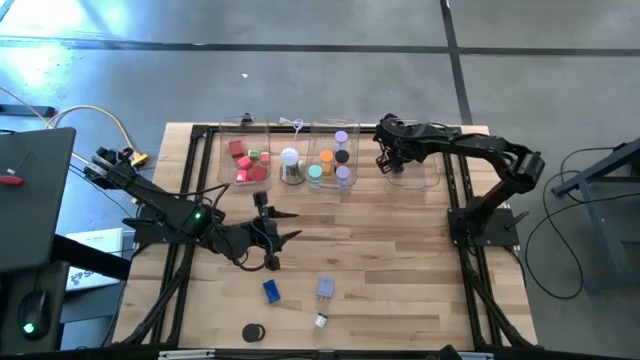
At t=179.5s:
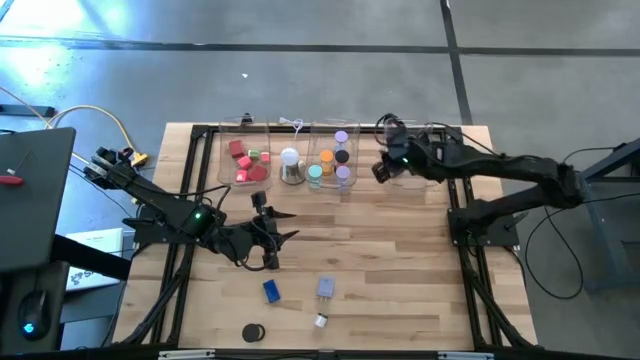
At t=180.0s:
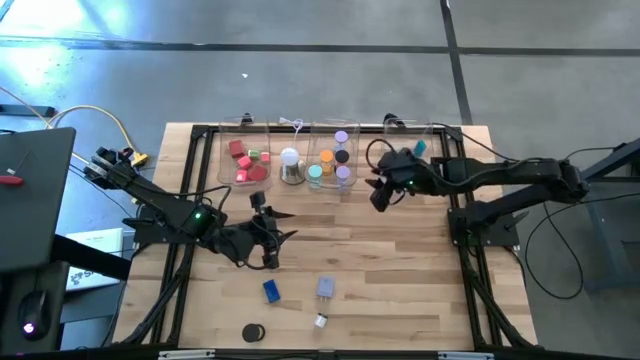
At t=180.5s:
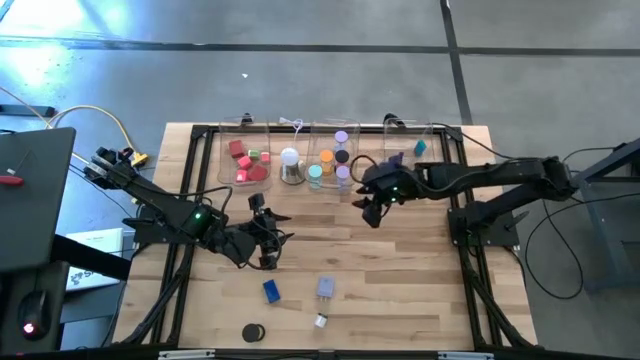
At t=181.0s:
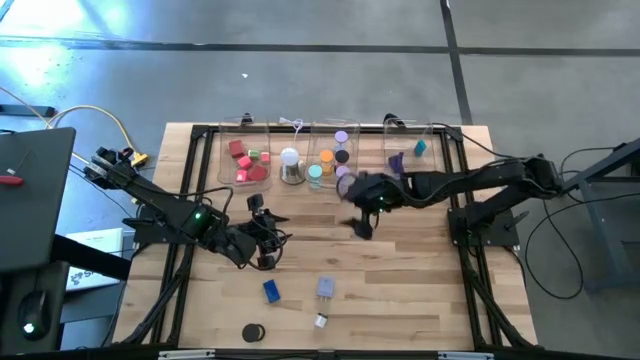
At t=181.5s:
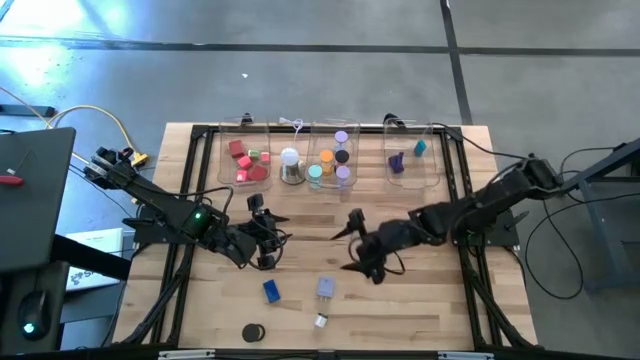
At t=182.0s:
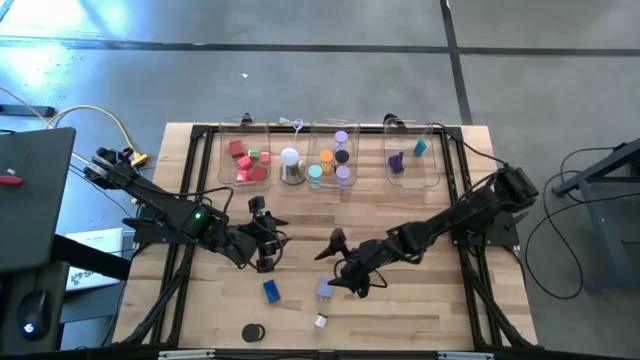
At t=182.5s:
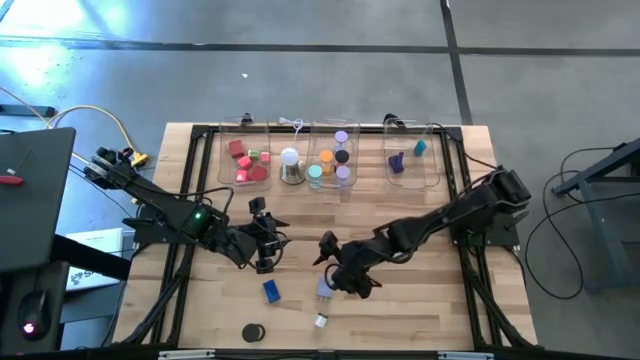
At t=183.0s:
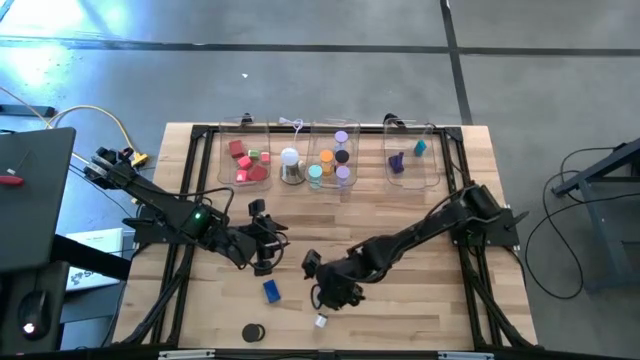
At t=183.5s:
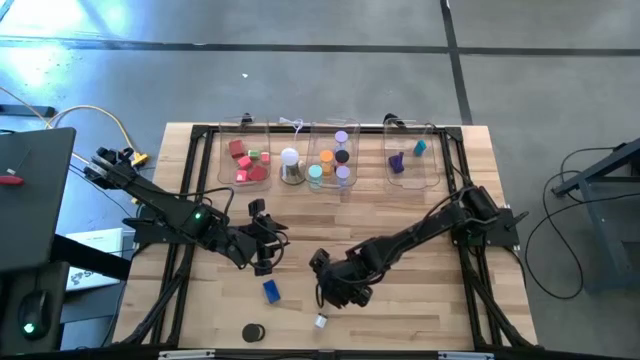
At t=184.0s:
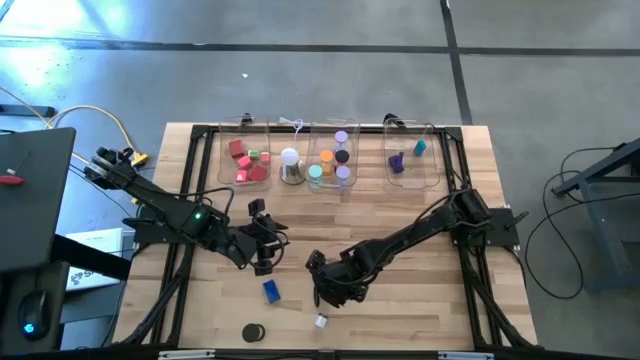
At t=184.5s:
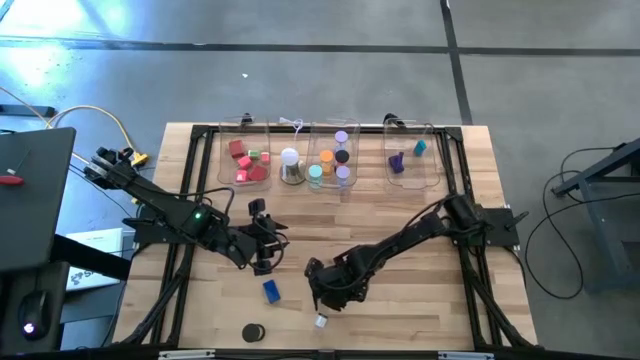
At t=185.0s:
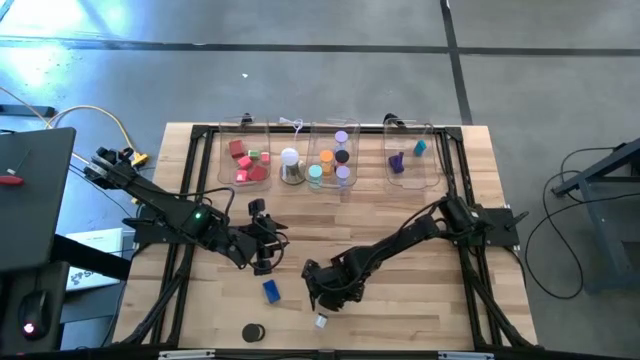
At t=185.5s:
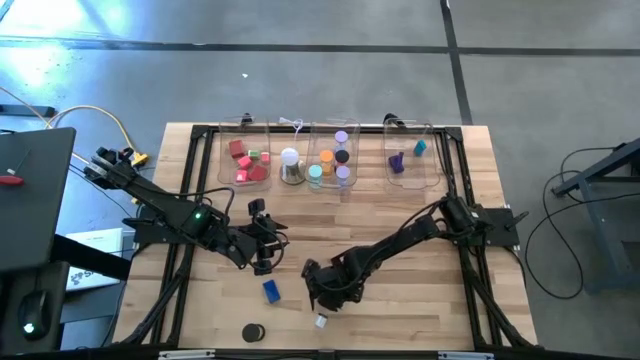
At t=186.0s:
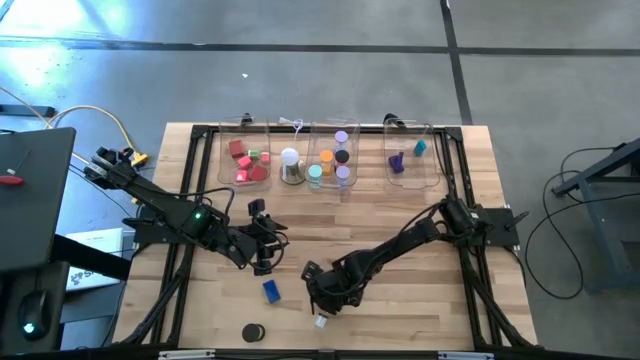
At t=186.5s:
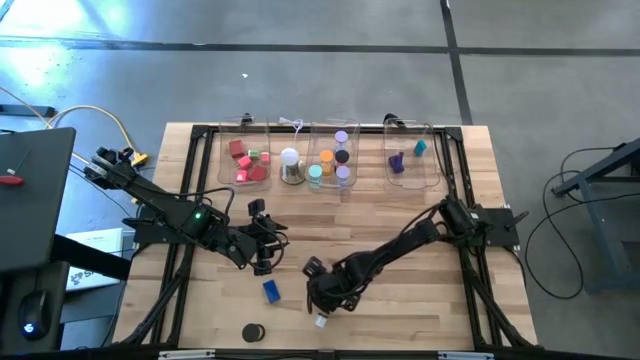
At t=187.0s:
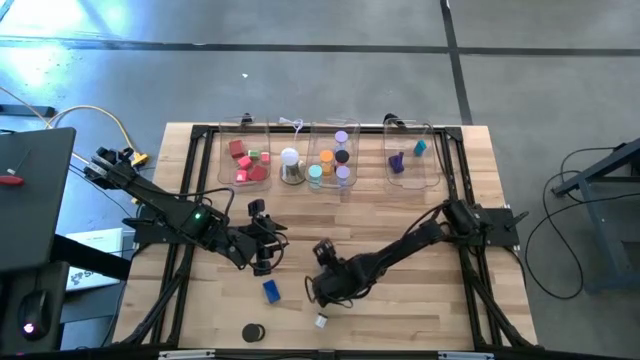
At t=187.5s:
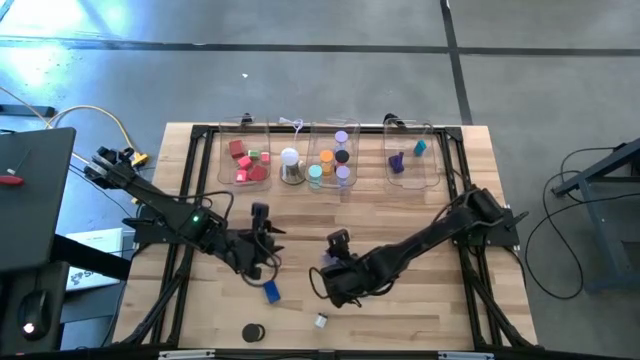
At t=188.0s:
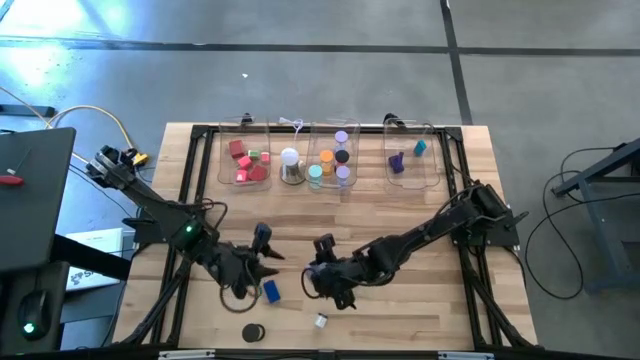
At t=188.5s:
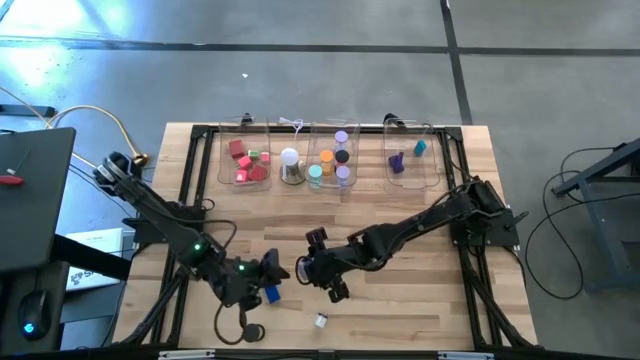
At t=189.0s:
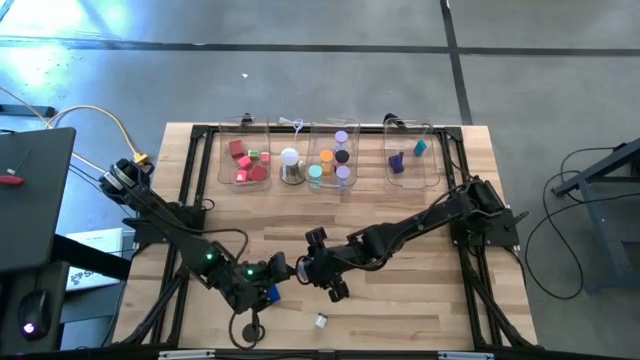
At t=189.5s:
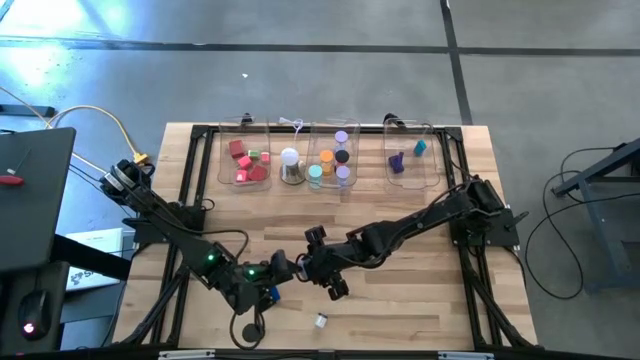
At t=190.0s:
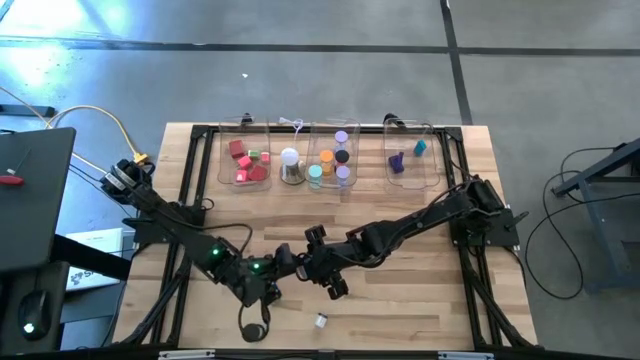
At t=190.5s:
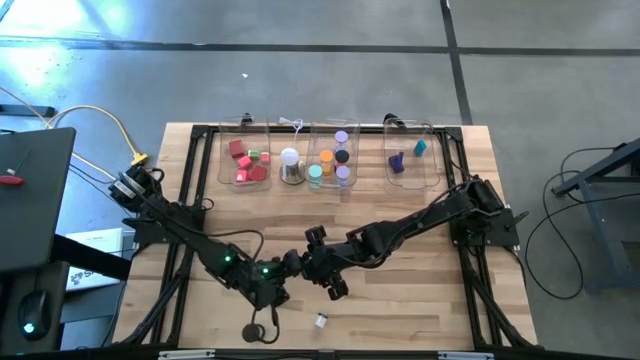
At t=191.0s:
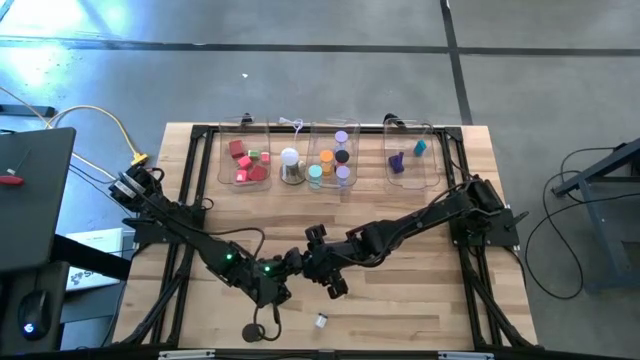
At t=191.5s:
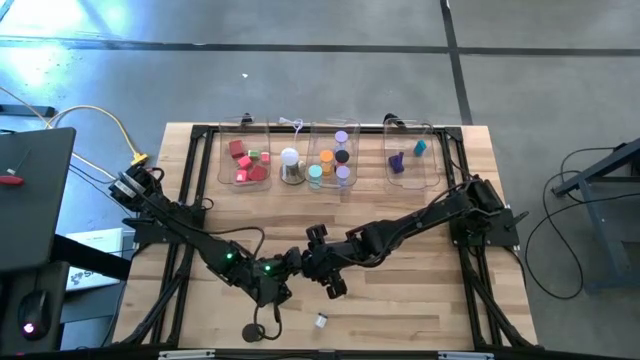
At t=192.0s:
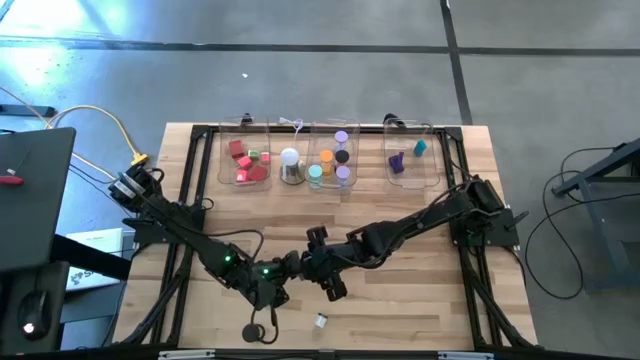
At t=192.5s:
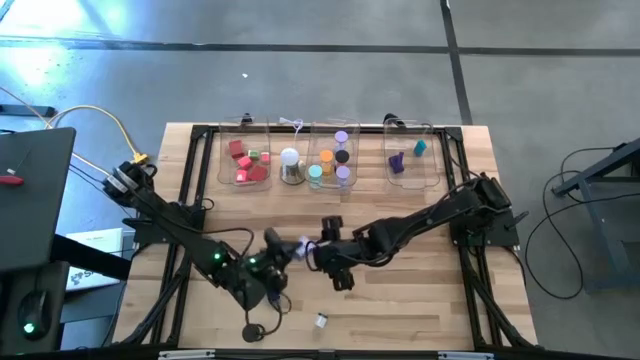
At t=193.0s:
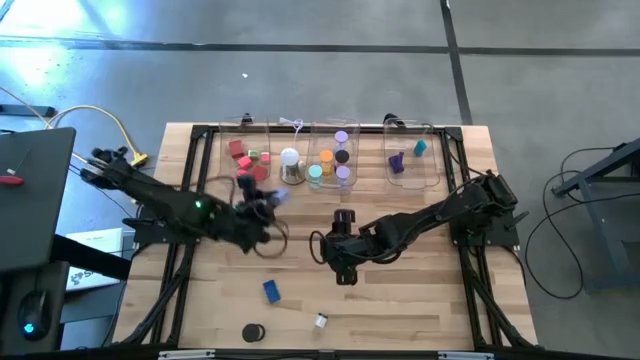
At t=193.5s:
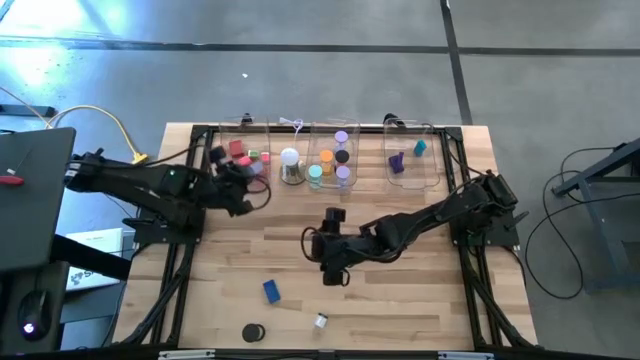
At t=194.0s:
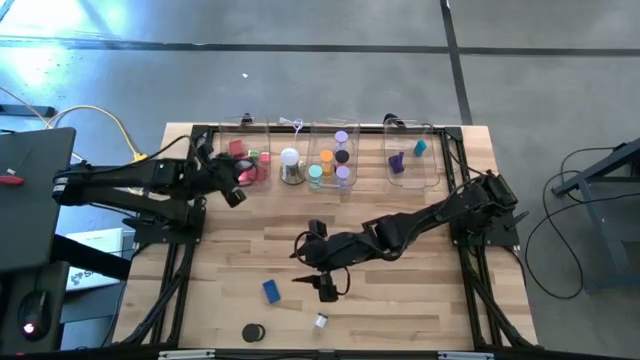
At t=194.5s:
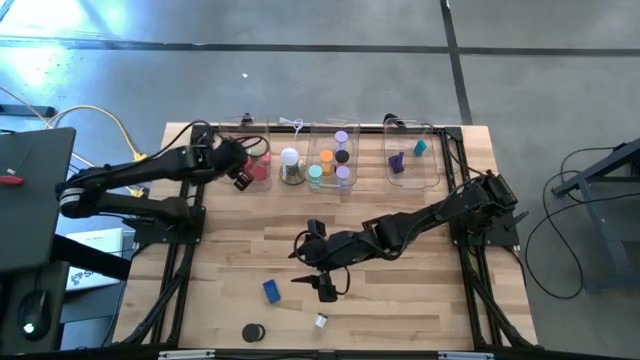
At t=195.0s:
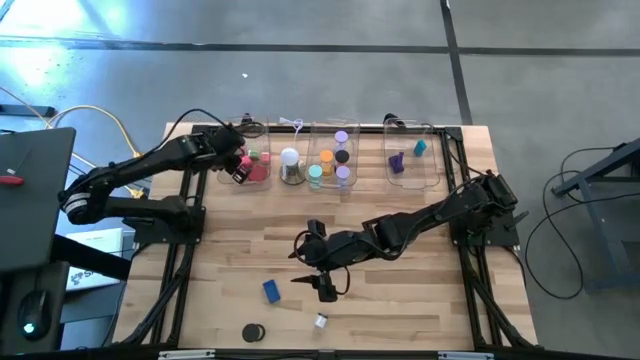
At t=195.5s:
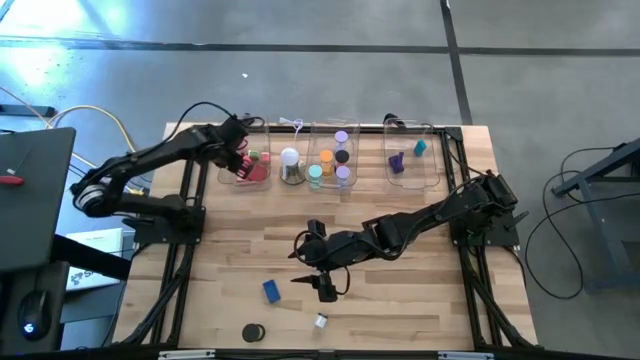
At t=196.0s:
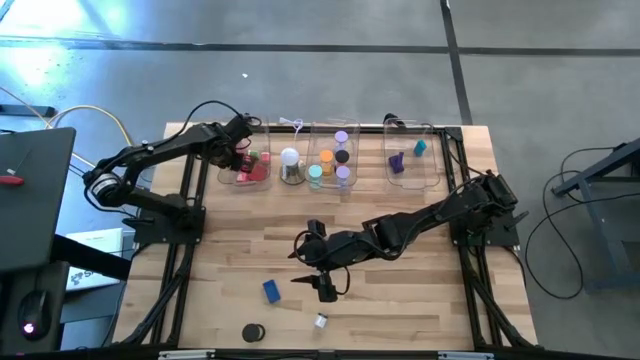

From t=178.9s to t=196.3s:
Task: Pick & Place Office items
Put the light blue charger adapter into the left transparent bin

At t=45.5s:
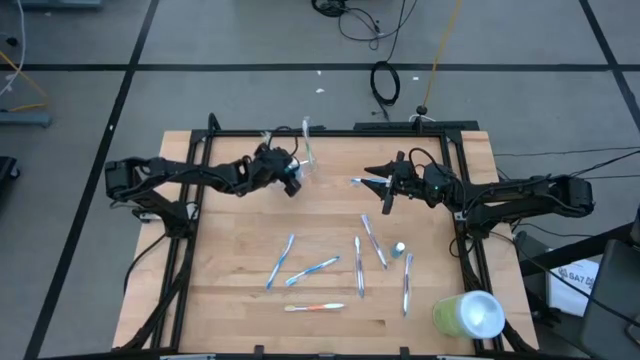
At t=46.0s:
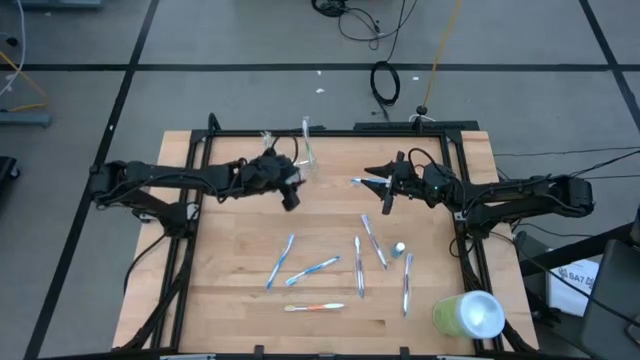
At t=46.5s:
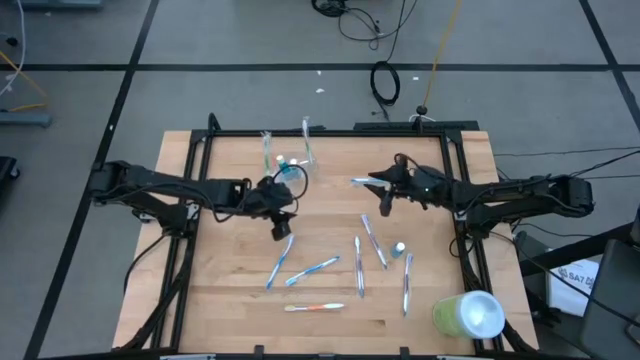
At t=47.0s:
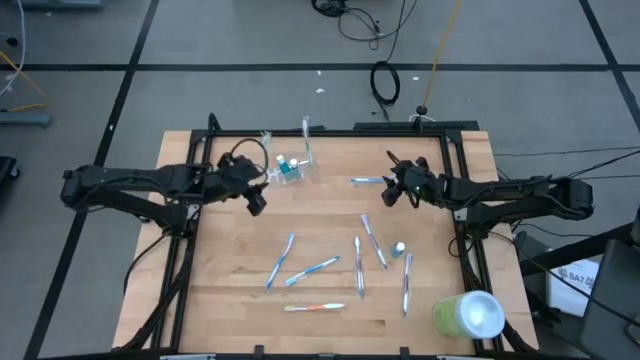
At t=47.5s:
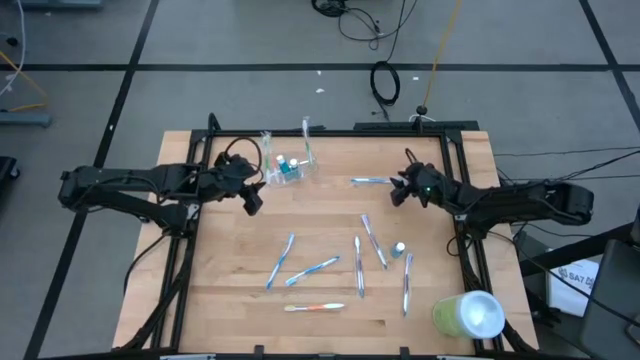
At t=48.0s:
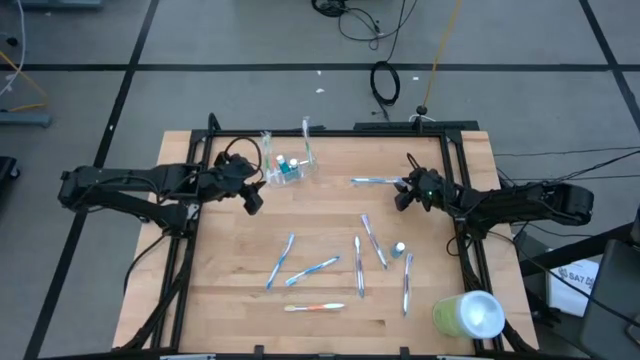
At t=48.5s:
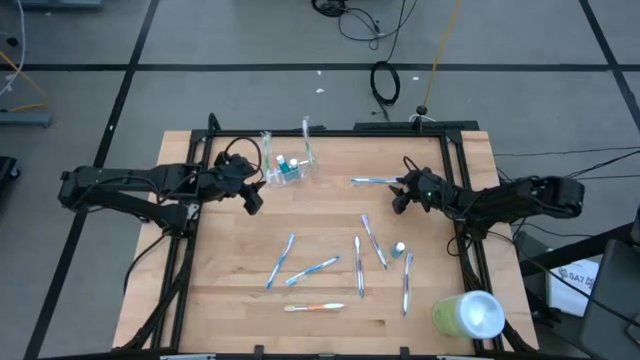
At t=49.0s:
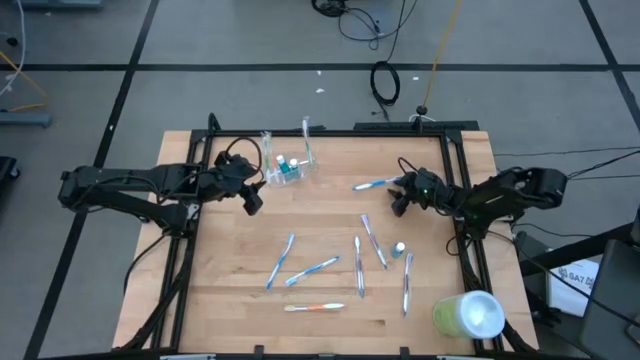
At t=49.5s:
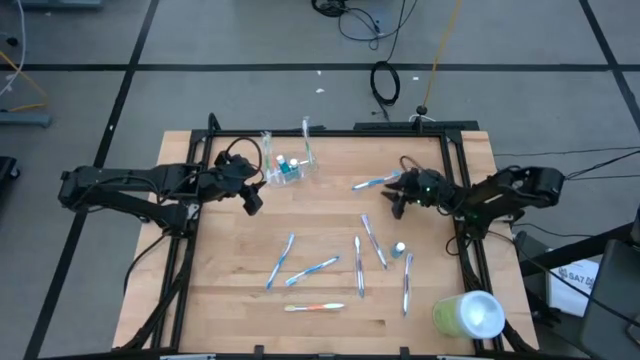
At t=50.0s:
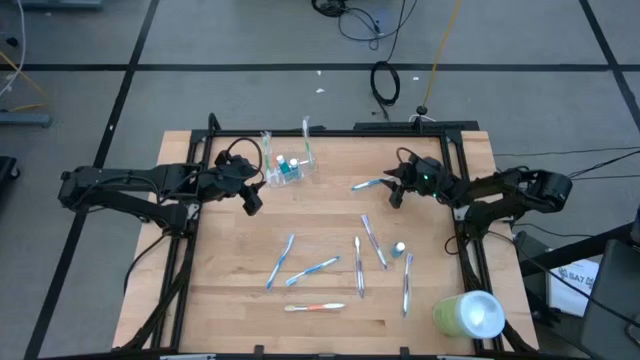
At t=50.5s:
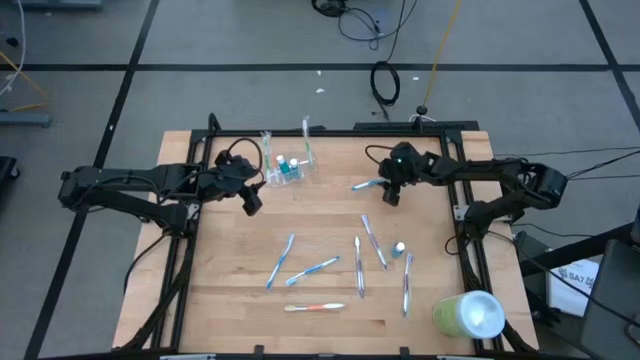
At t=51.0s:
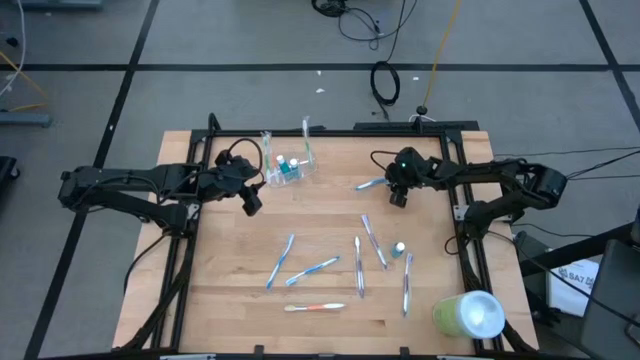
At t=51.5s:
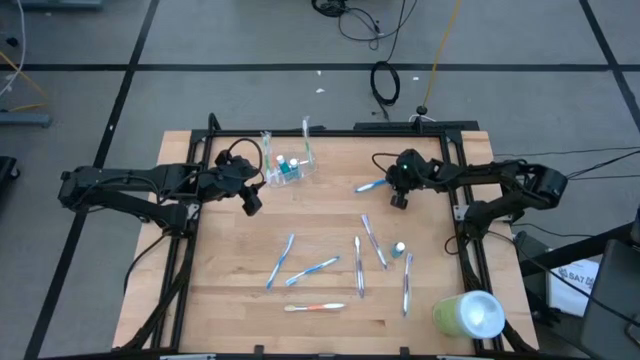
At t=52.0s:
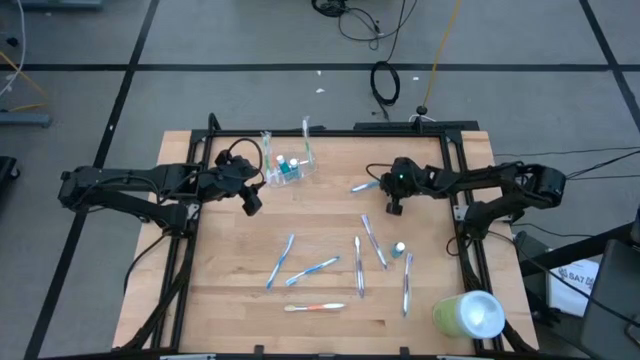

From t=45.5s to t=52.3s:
Task: Pick & Place toothbrushing station
Put the top right blue toothbrush into the transparent organizer
